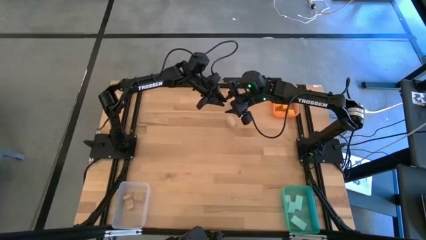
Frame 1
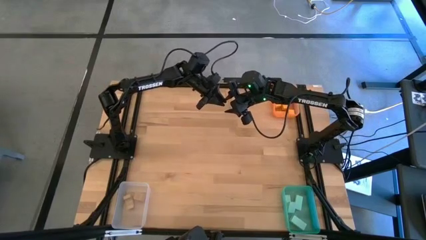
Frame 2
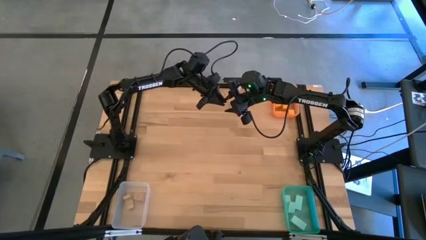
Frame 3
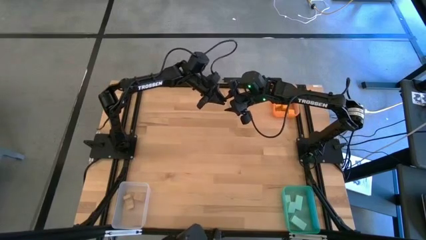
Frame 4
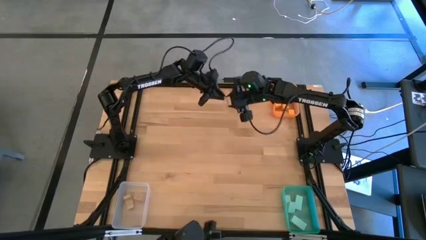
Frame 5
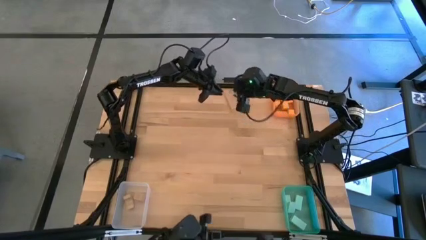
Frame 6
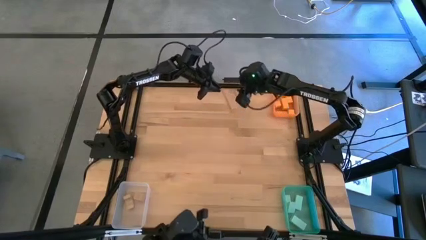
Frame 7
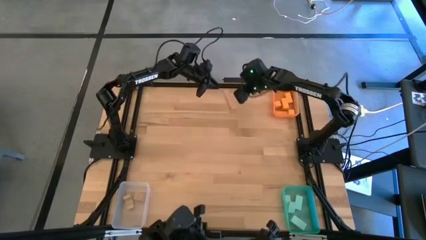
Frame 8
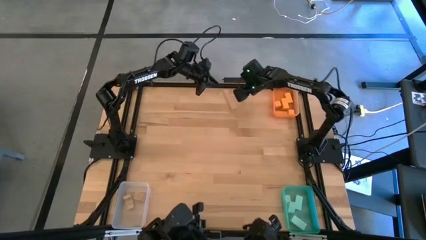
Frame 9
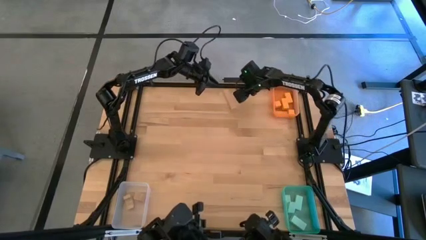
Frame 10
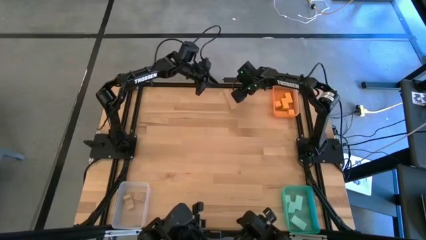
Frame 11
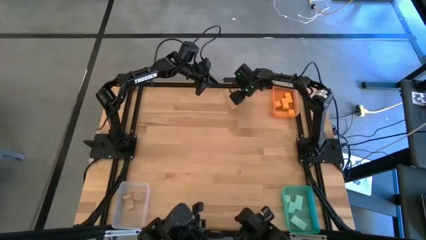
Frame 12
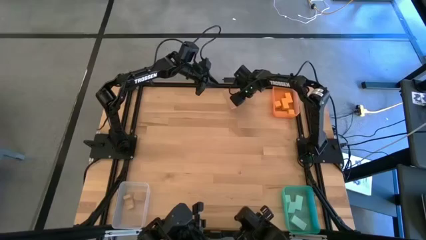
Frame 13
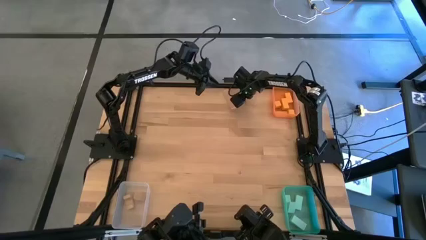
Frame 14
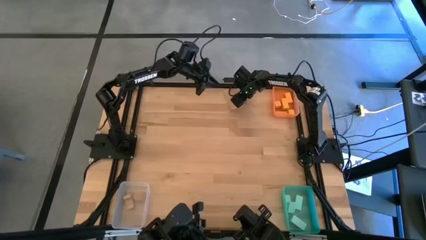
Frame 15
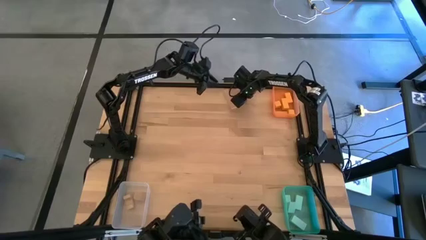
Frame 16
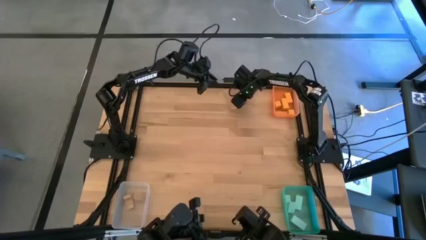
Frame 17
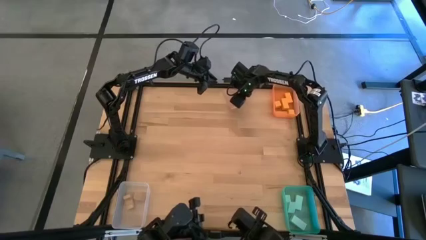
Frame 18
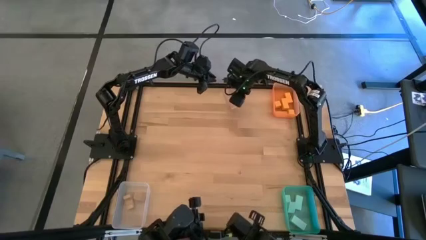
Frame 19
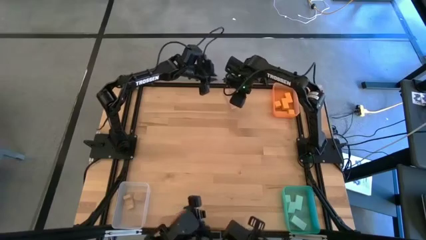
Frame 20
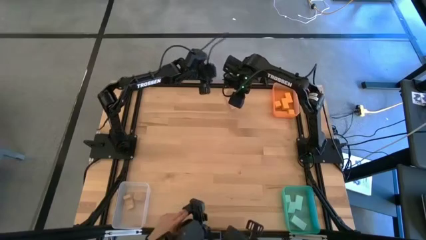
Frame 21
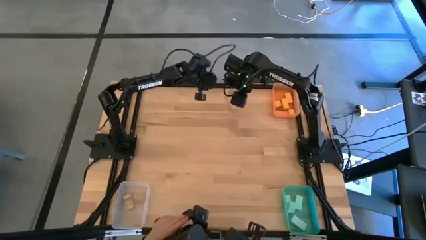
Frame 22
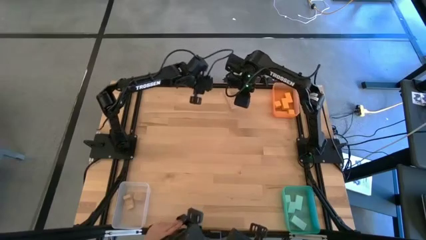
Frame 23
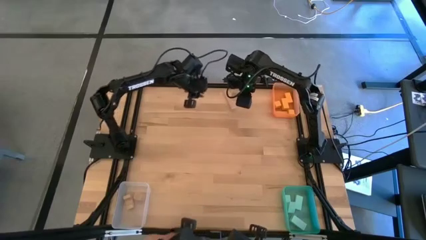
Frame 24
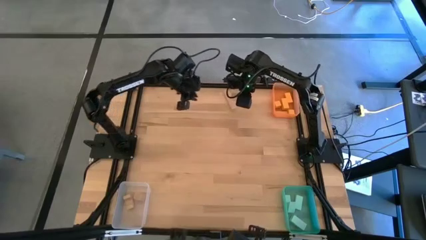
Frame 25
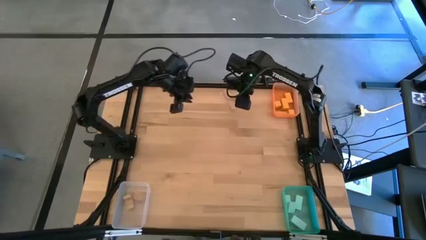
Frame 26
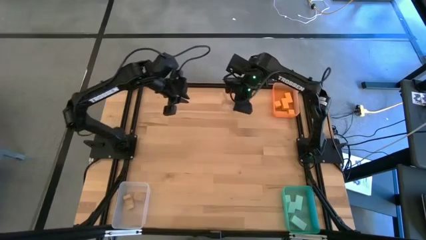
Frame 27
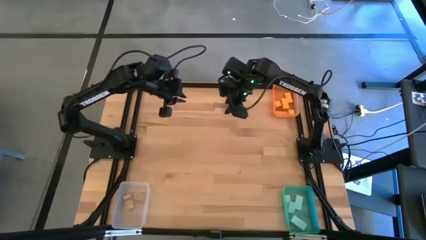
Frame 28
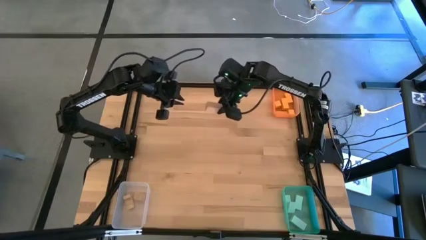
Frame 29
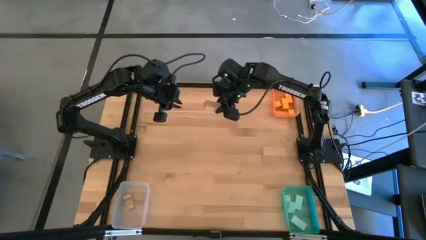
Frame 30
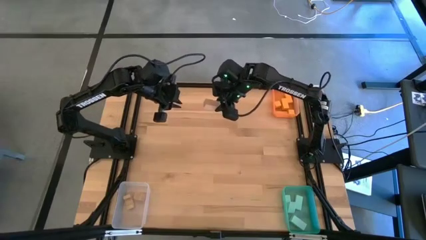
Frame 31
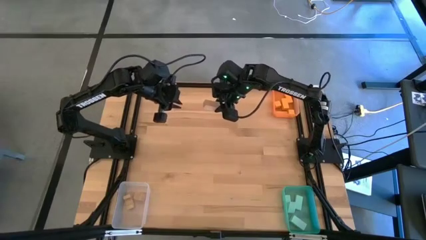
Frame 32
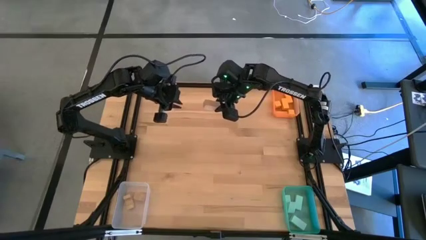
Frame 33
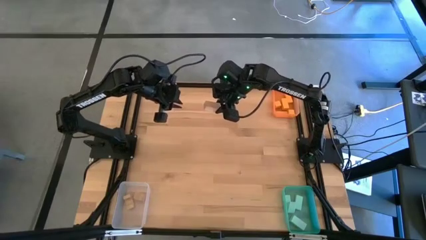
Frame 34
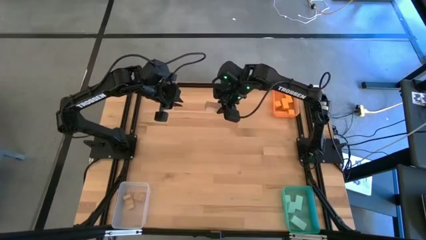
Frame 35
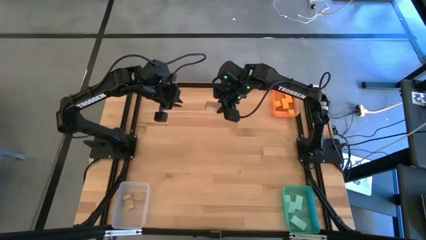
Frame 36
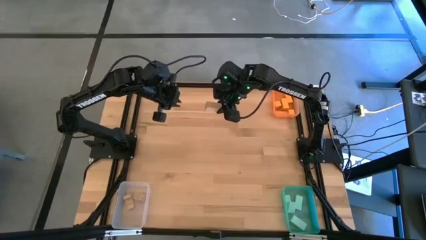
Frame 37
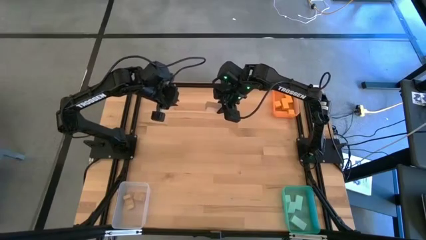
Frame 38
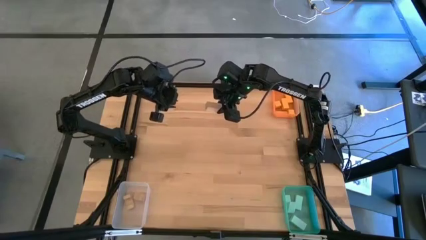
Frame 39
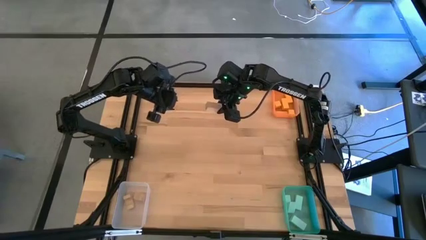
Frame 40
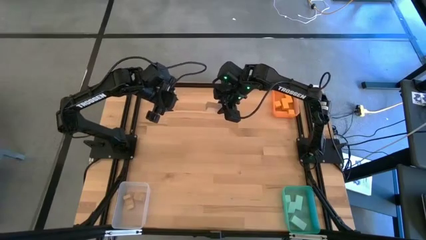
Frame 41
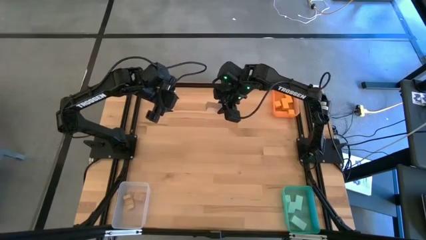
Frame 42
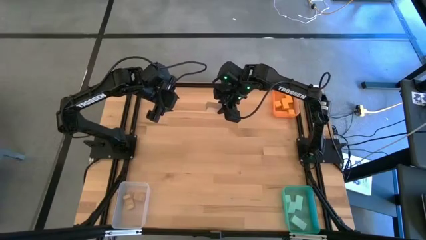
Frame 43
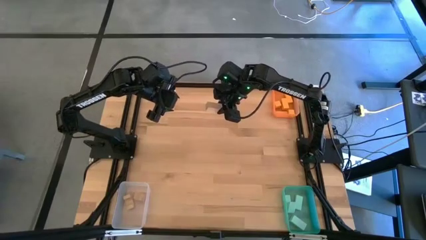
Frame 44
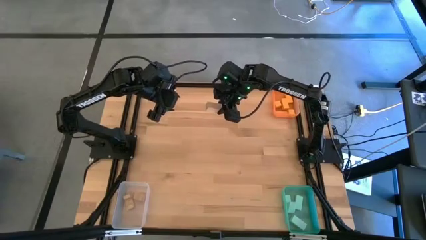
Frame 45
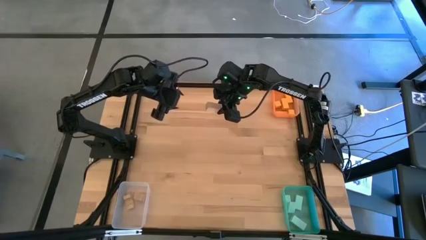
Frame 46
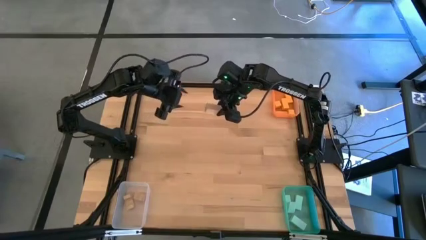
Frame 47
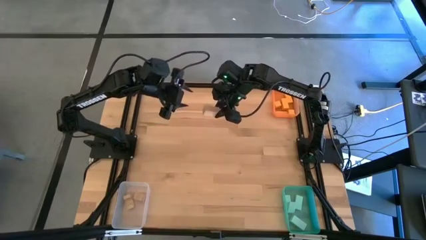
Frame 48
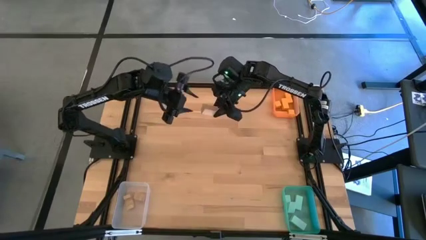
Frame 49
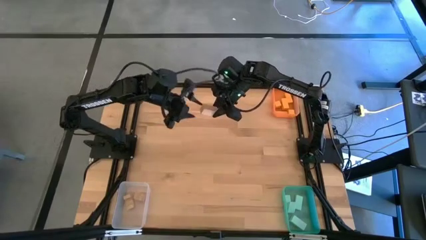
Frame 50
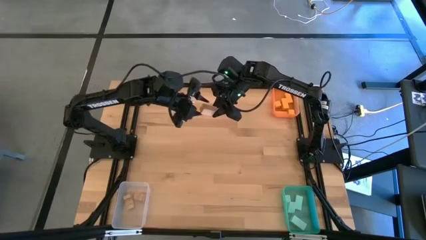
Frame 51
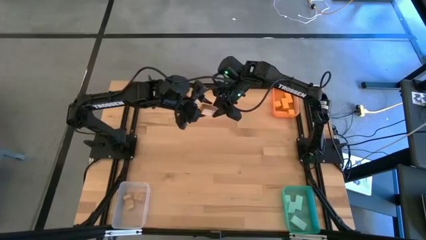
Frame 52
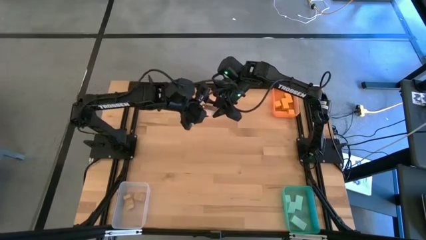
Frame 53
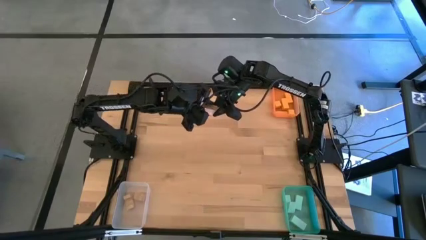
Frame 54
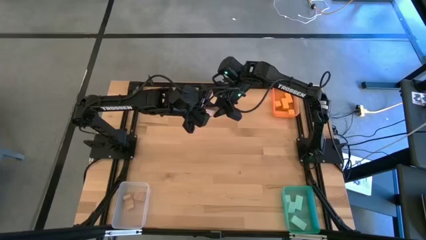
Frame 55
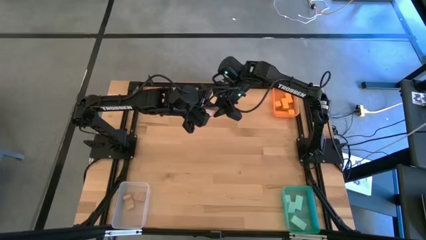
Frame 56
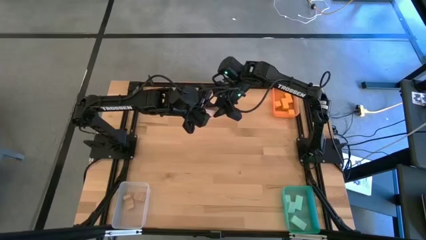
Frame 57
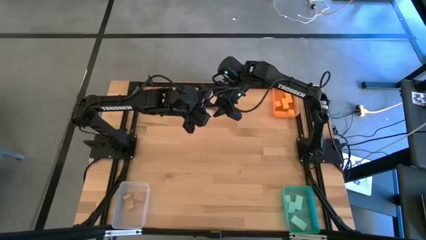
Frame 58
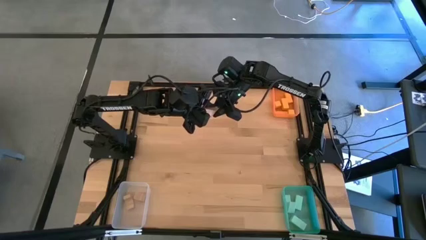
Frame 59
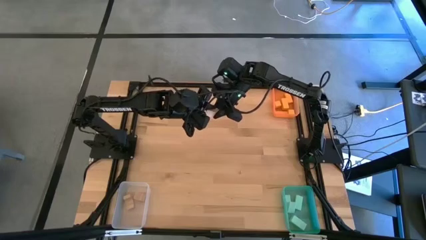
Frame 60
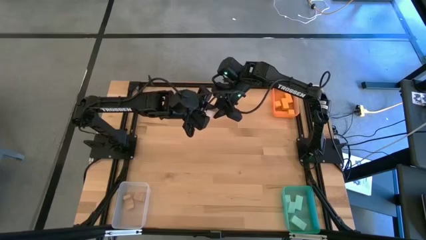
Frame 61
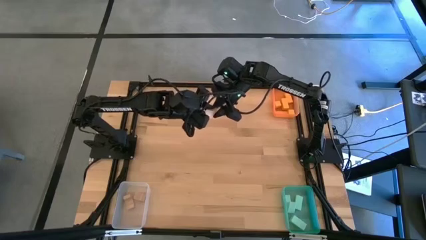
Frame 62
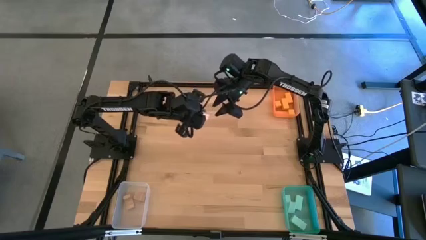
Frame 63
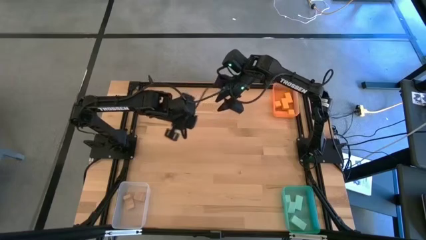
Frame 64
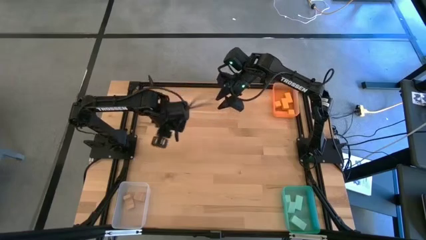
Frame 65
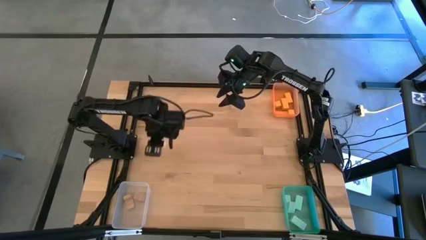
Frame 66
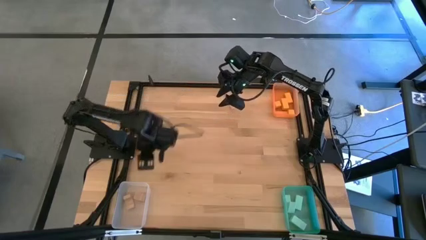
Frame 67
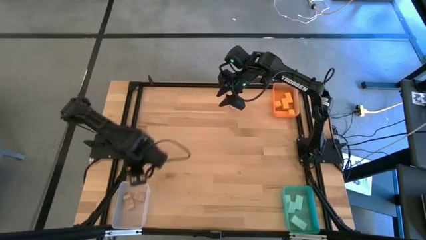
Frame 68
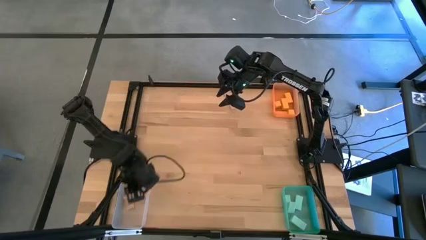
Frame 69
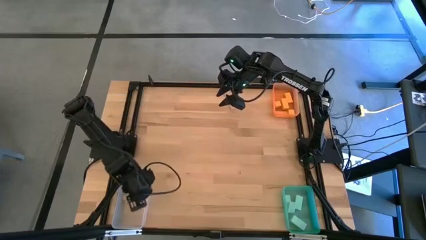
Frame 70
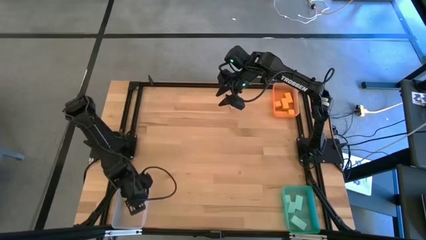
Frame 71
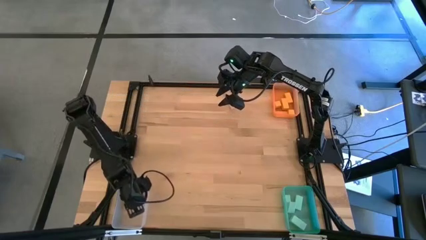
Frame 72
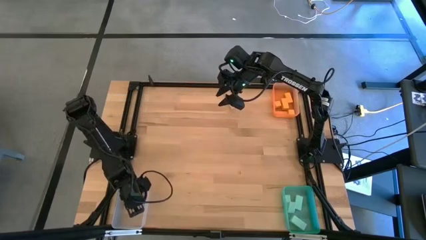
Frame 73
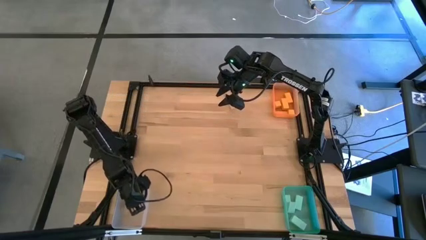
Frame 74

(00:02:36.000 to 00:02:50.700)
Task: Sort & place blocks by color
Put the brown block into the transparent bin

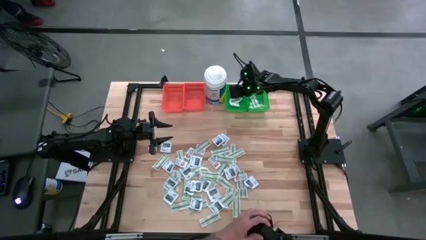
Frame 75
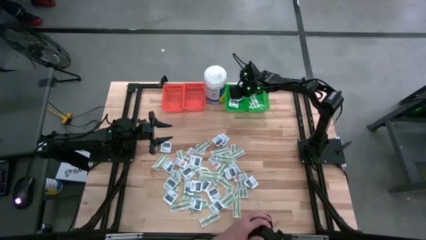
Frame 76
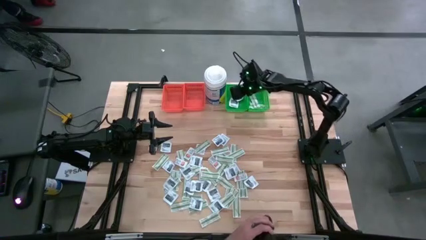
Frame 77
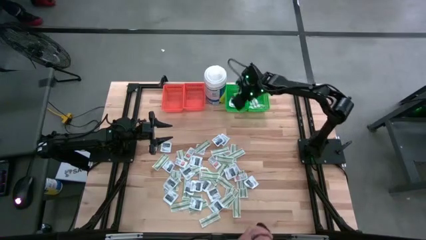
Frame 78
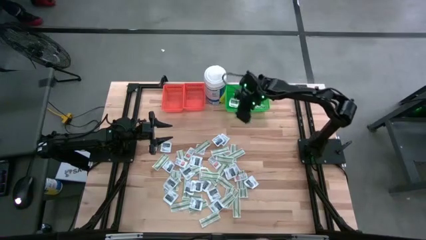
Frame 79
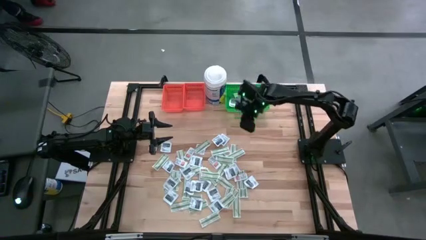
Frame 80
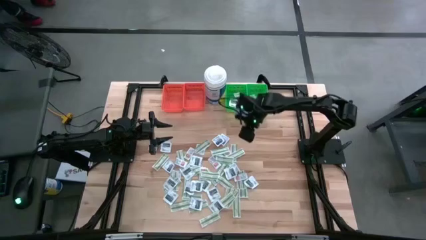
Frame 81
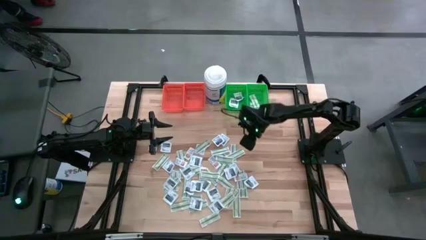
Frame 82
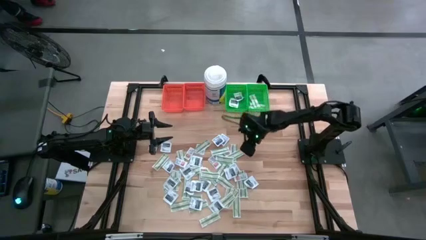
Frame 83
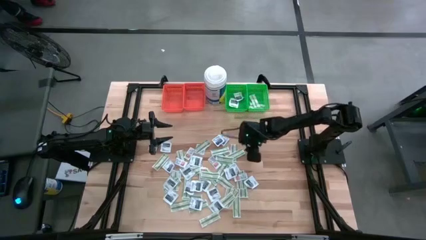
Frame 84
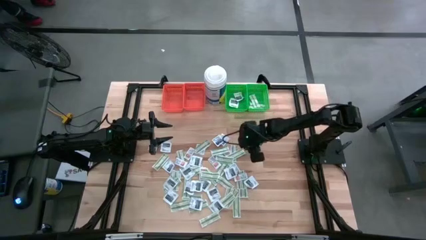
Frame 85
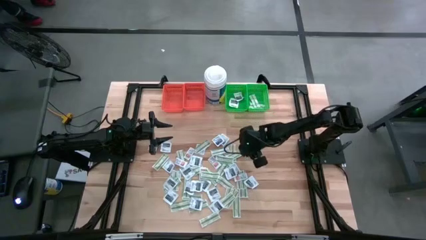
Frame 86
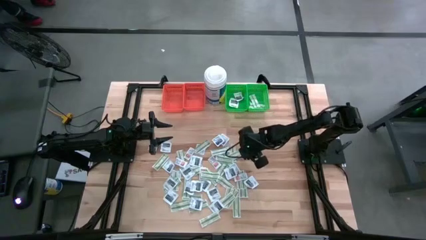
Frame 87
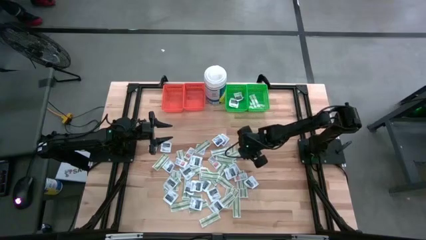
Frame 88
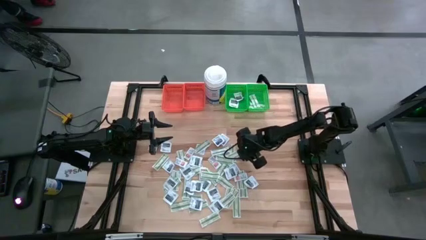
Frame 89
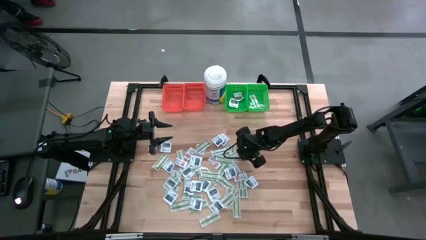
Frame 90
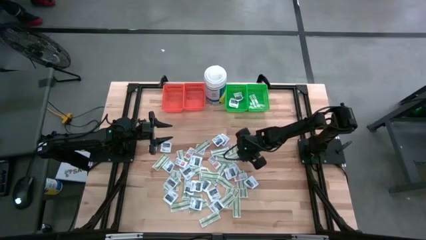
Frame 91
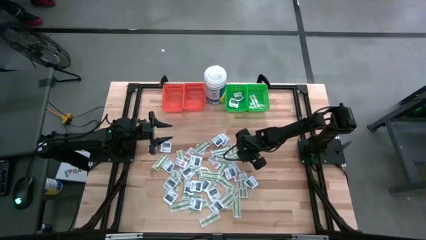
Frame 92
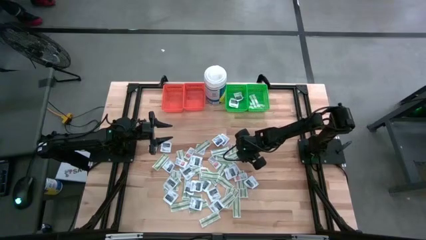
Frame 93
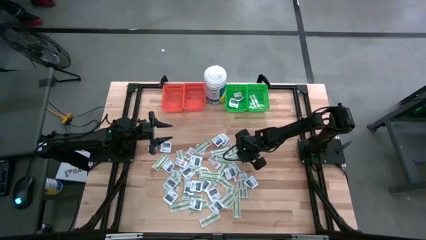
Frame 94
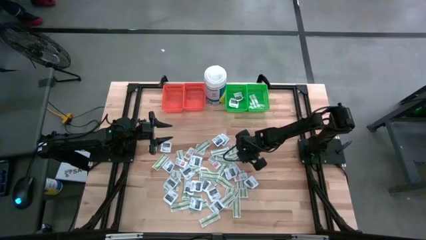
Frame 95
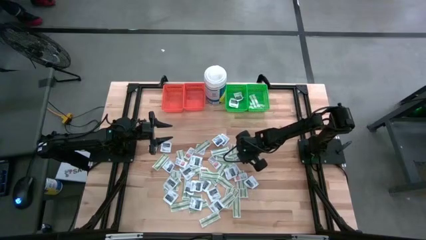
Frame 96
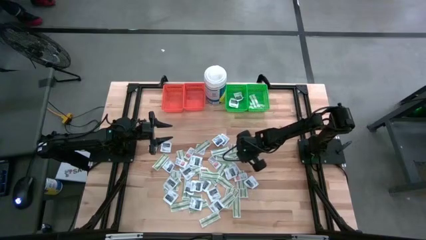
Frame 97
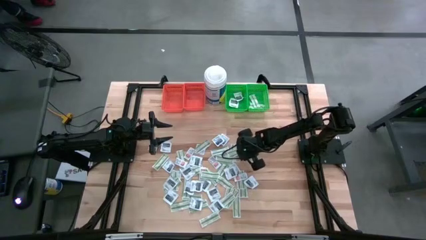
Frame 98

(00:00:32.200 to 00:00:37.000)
Task: Pick & Place First Aid Supplies
Put the green bandage pack into the right green bin
